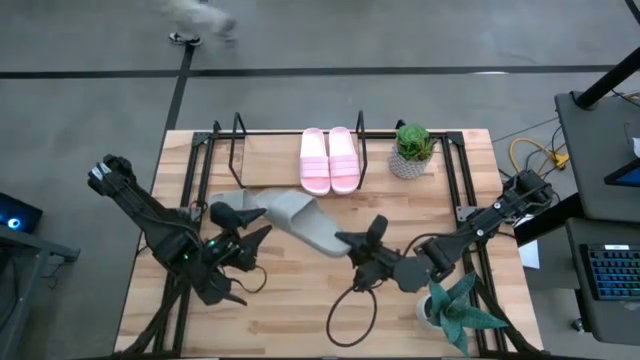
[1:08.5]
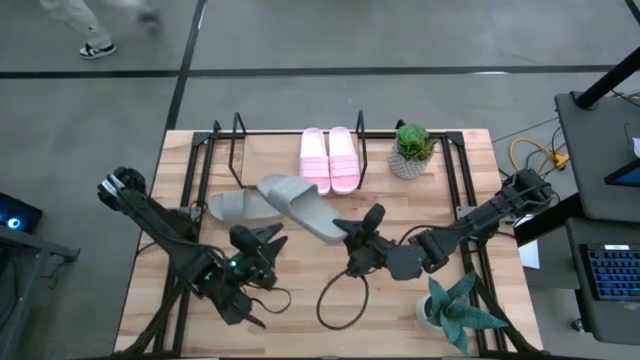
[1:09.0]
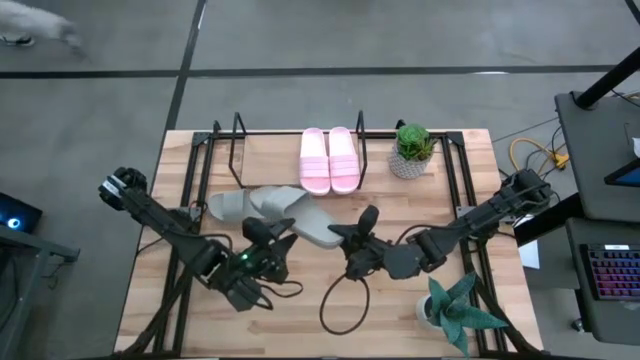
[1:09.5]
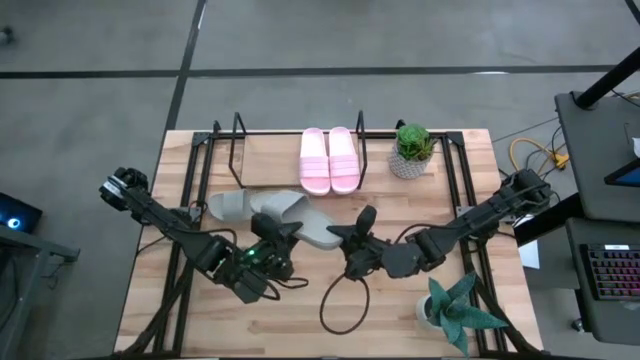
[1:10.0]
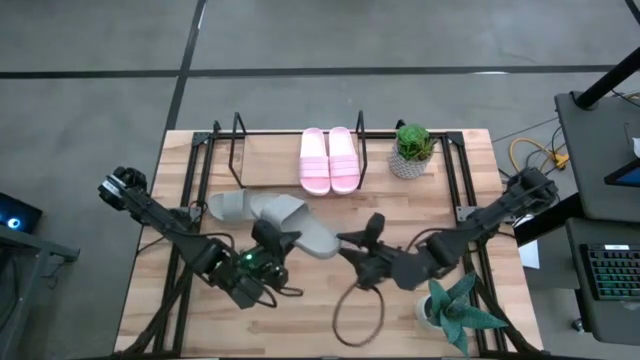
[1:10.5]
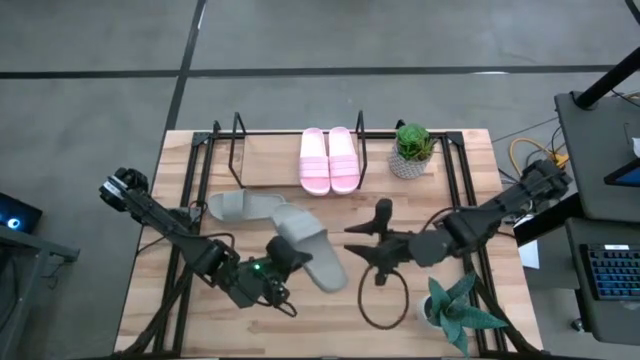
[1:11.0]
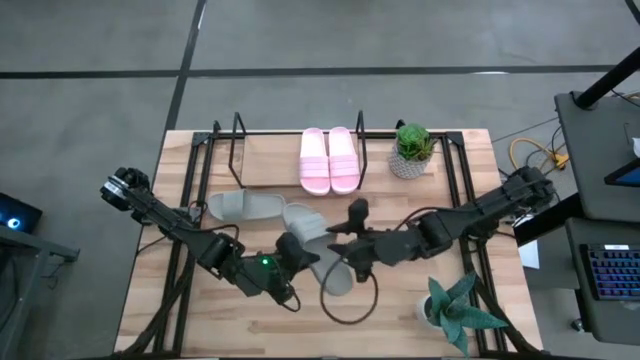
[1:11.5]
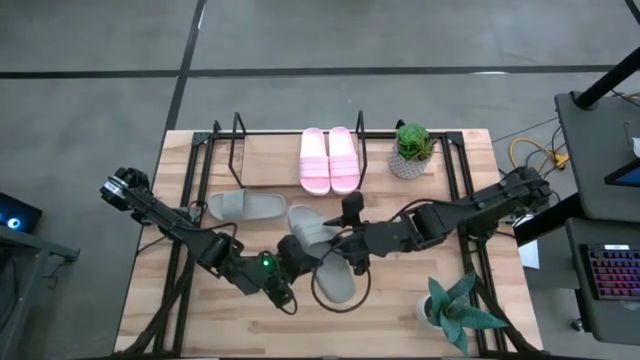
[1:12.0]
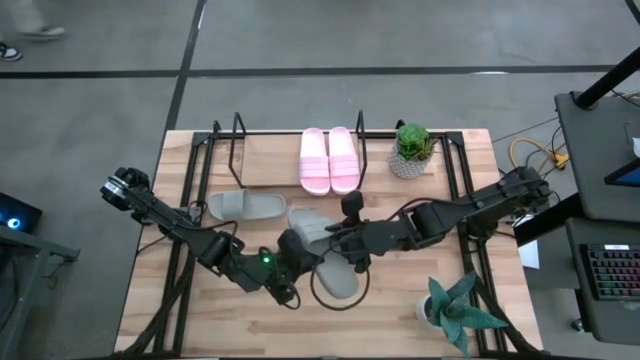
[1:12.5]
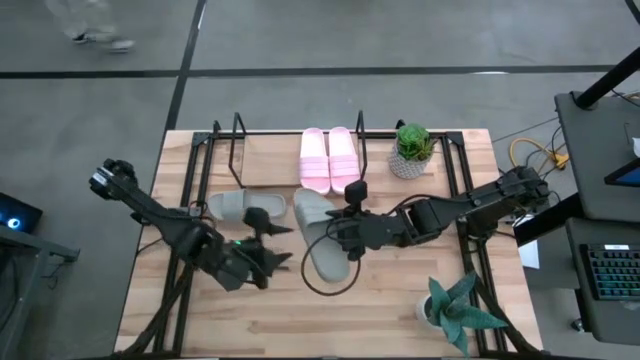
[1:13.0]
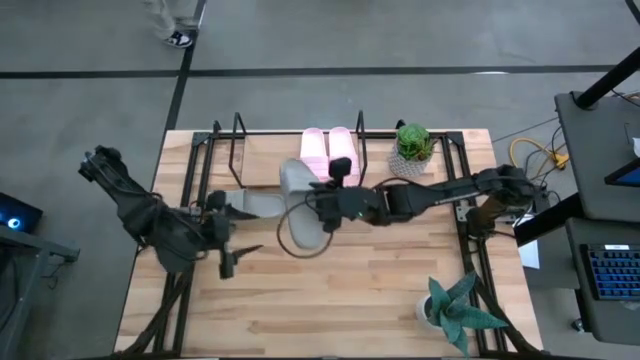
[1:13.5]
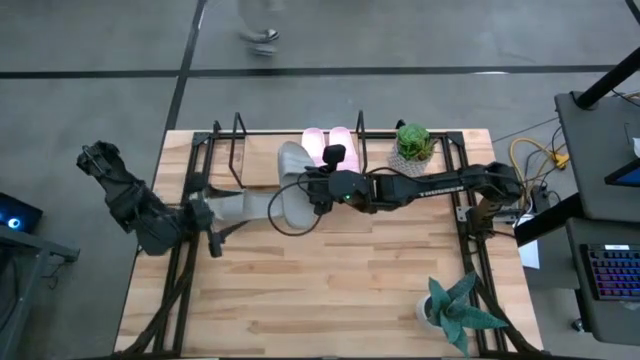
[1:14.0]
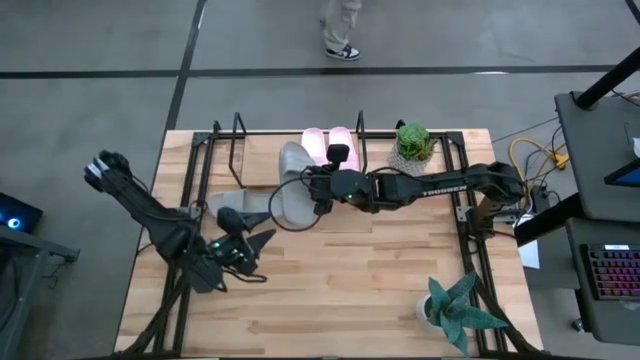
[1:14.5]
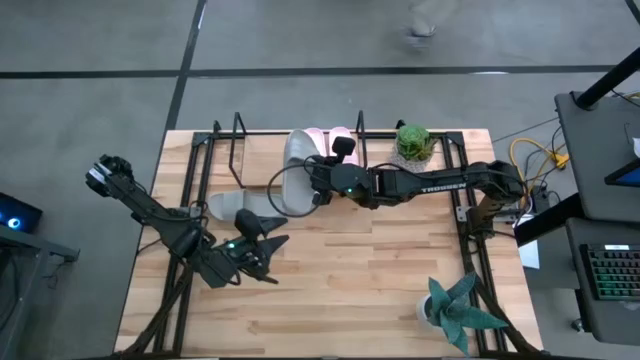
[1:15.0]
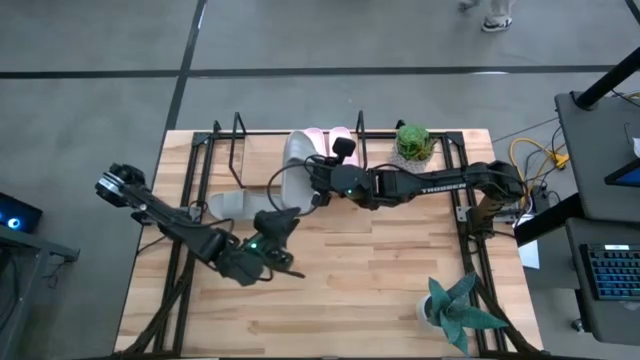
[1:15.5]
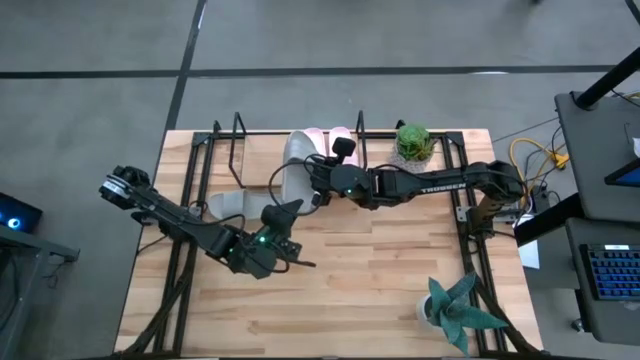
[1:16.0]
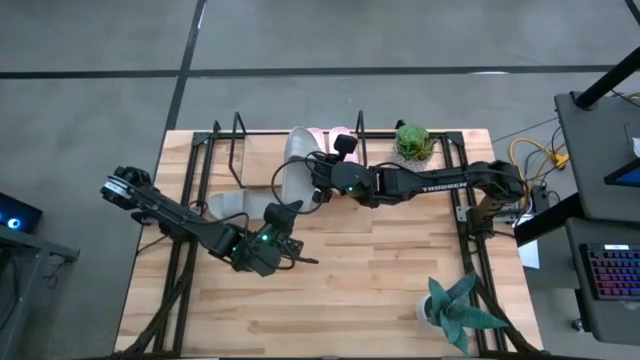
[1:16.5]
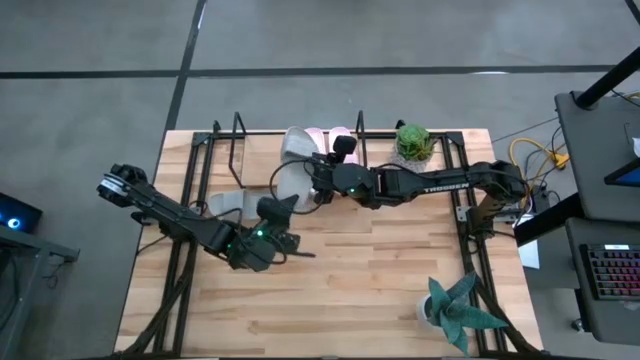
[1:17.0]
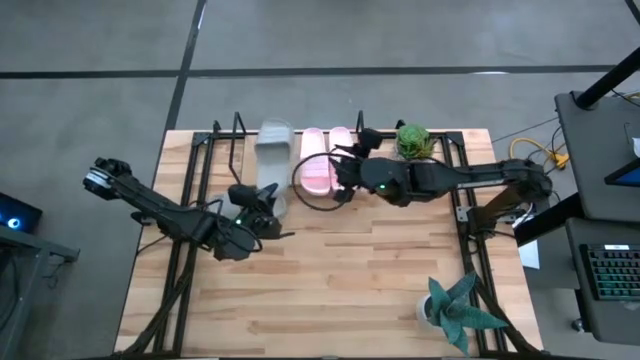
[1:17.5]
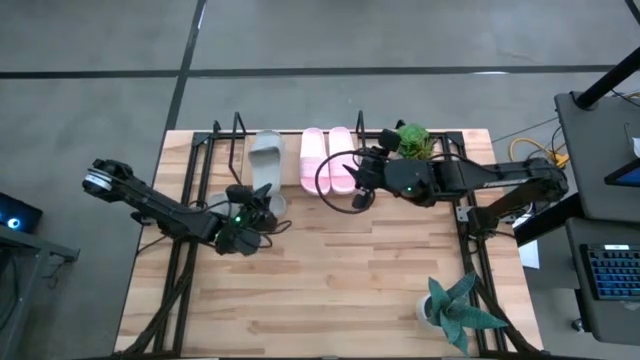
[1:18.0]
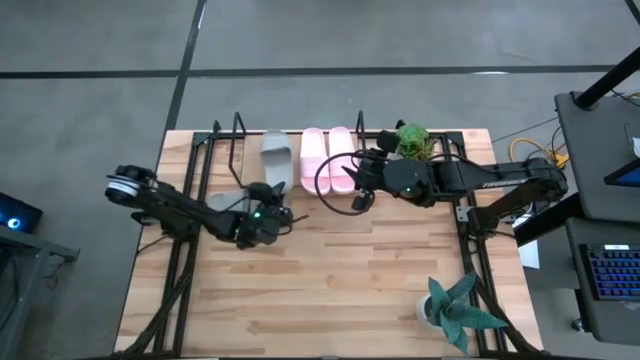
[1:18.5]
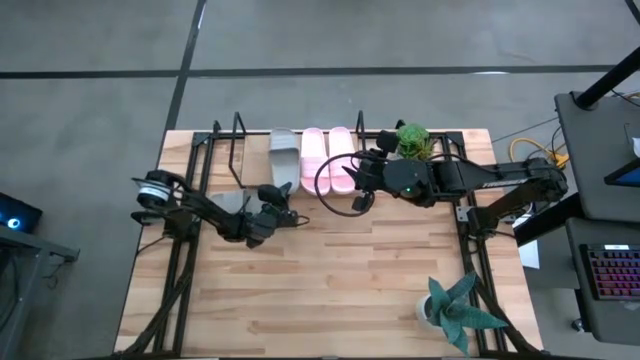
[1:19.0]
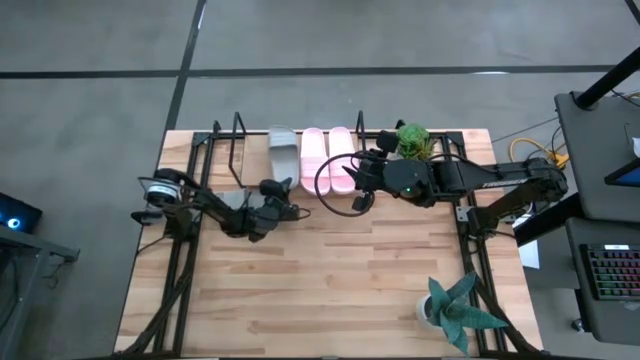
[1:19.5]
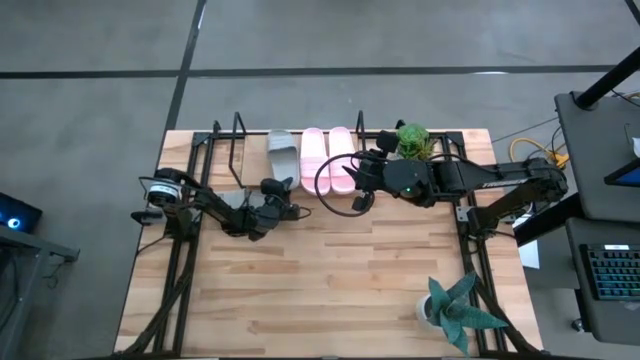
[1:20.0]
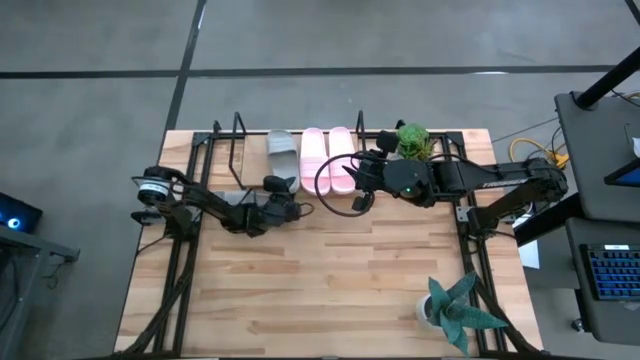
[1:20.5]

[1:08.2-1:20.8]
Task: Pick and place slides into the shelf
Put the bottom gray slide on the shelf

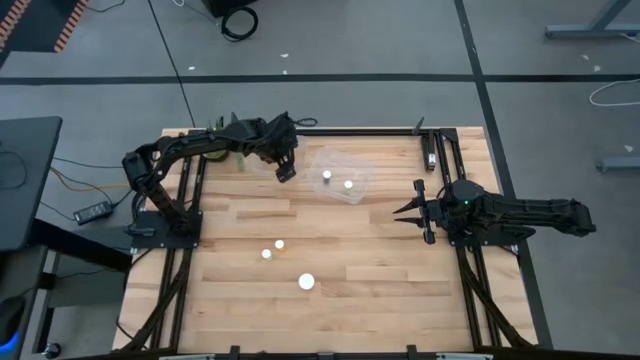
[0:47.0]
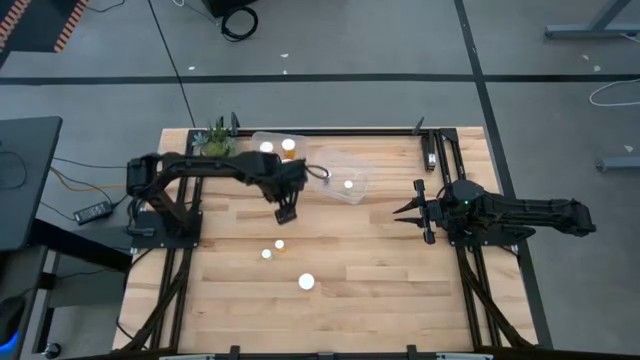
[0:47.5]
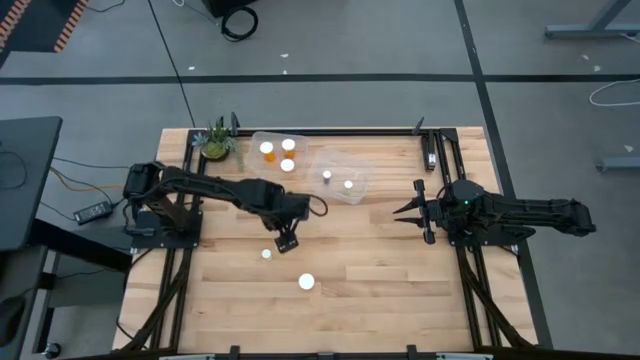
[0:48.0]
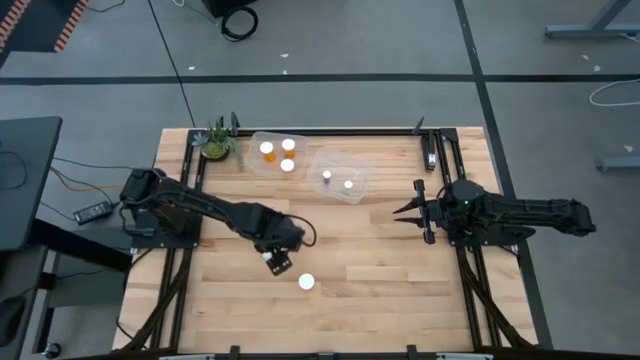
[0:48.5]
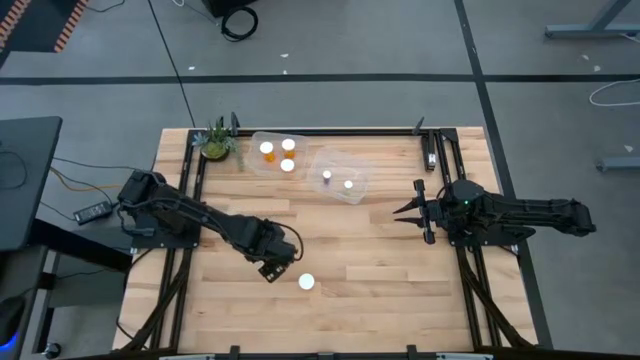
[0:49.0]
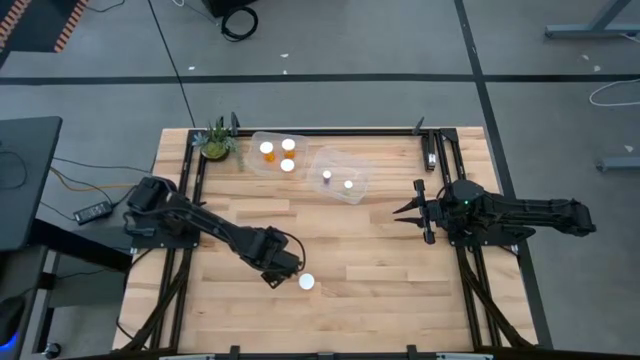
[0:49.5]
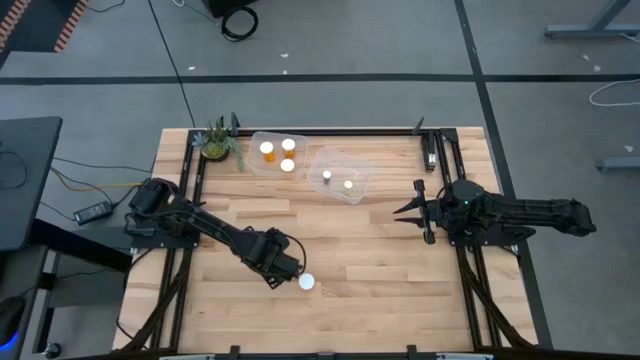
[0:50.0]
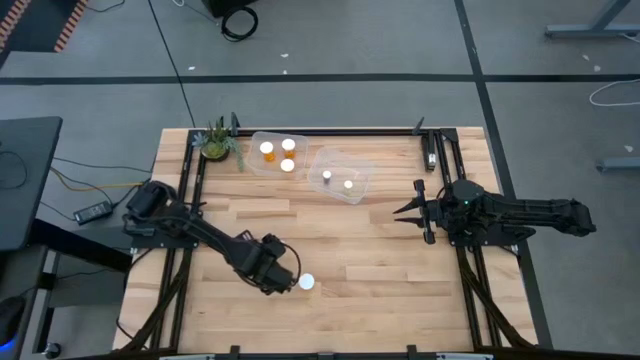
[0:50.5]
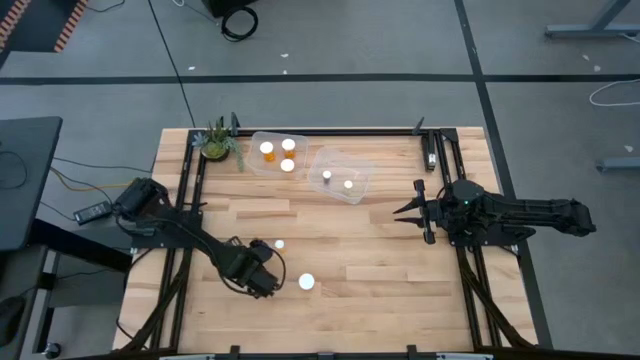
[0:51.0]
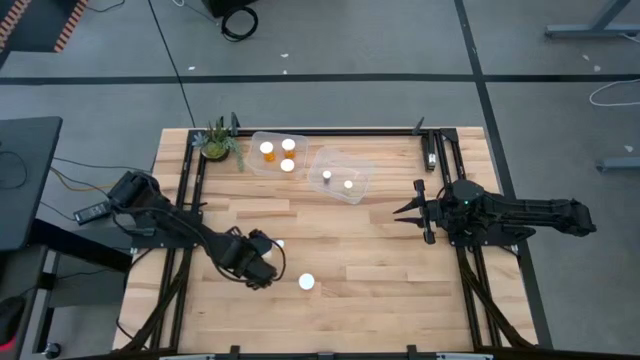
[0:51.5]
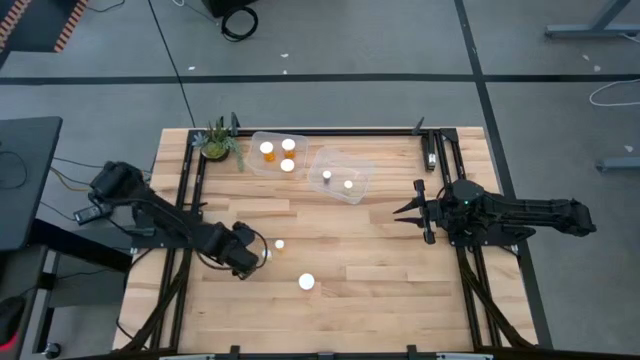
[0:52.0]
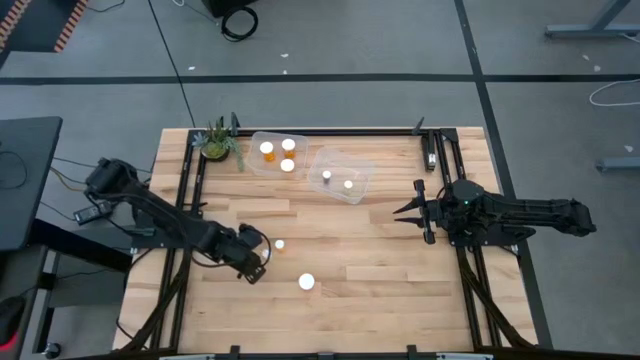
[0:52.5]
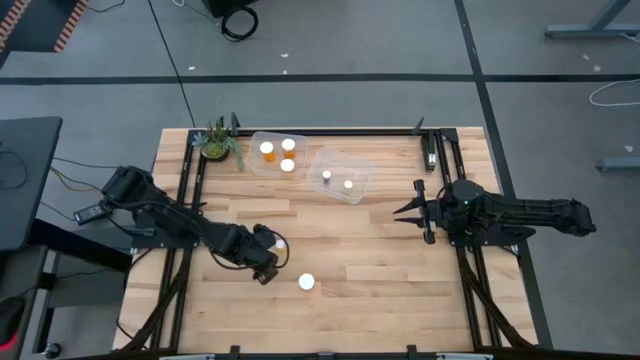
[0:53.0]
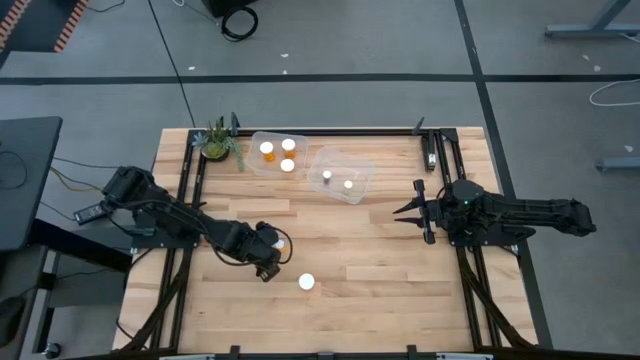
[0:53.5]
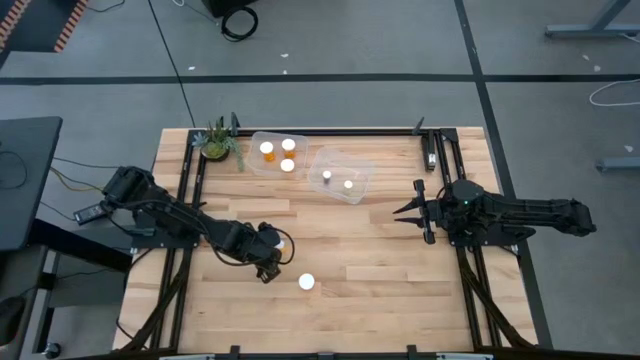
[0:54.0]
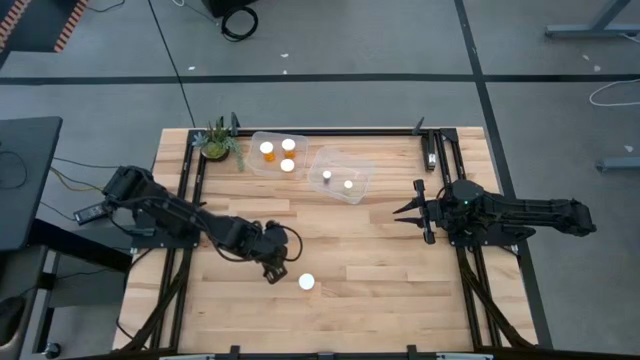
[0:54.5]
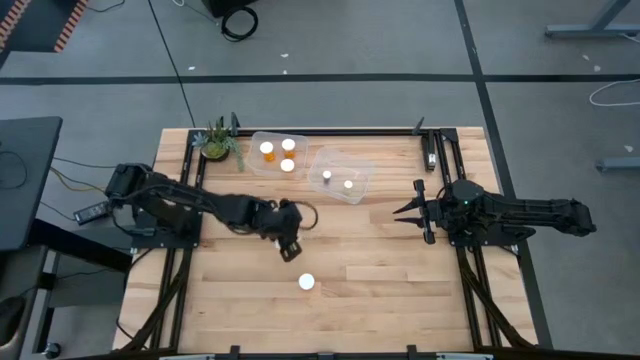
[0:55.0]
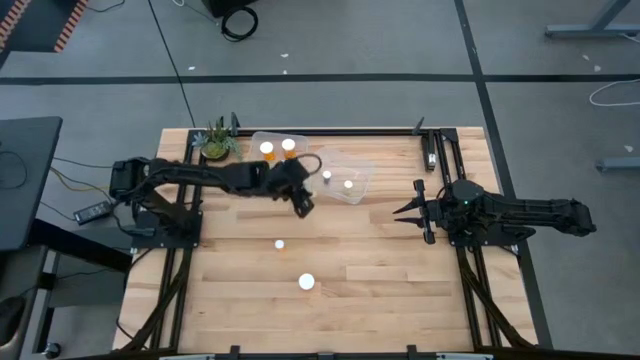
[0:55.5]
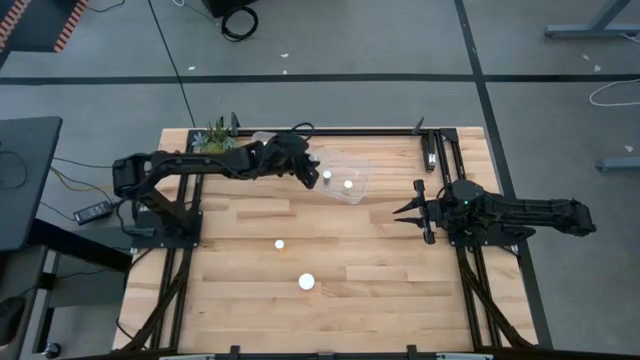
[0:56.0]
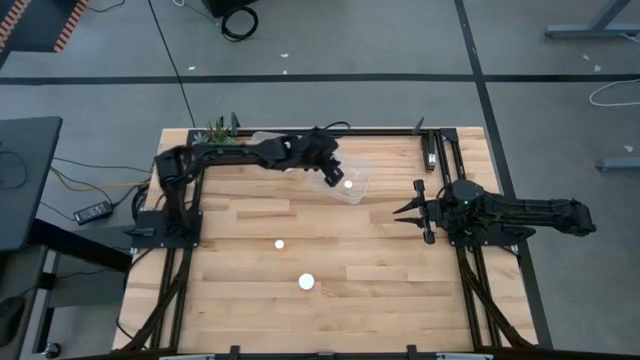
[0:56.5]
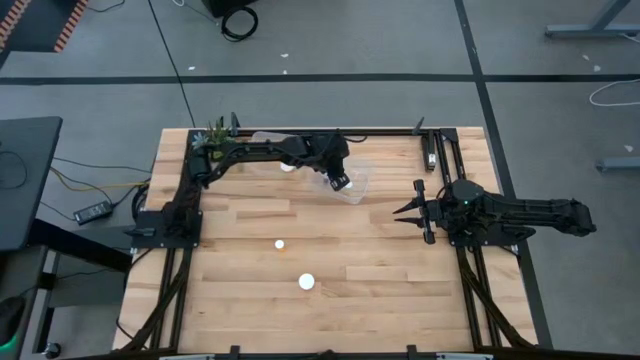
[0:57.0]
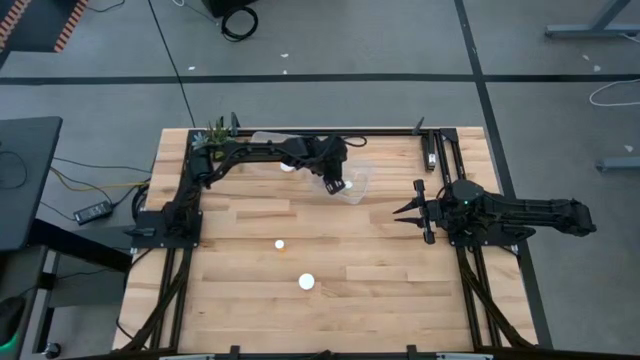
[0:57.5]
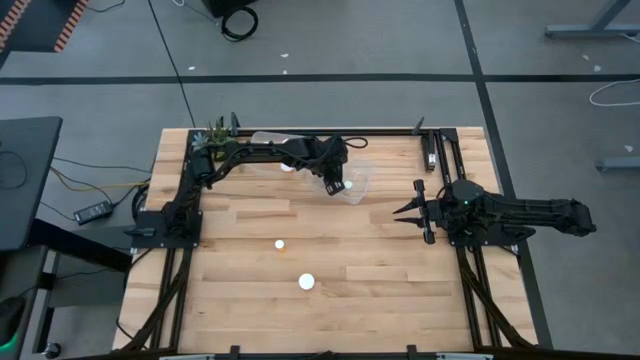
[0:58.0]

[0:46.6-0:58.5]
Task: Pick and place medicine bottles into bin by pill shape (circle, oval)
Put the yellow pill bottle into the right transparent bin
